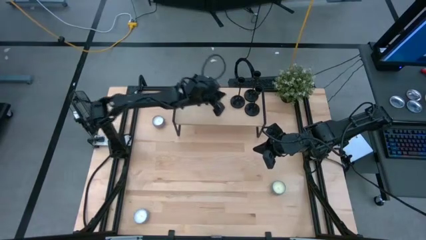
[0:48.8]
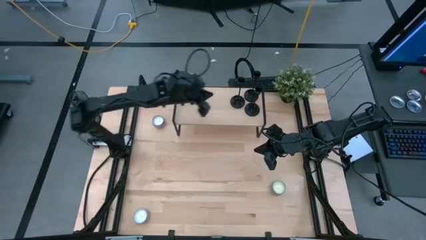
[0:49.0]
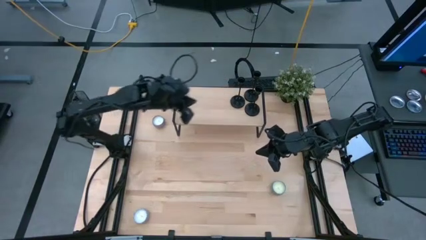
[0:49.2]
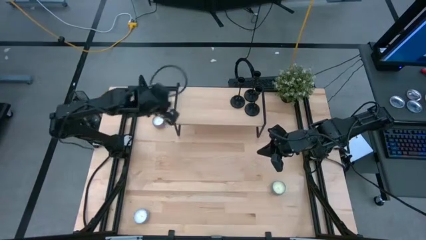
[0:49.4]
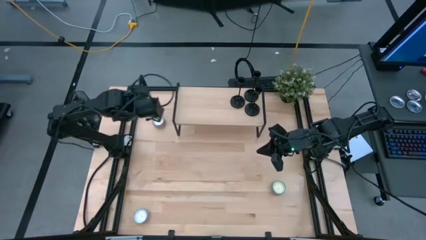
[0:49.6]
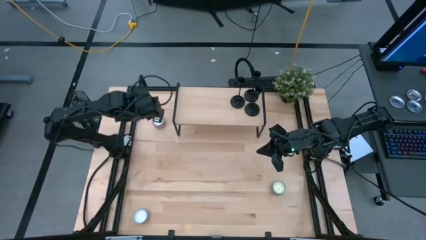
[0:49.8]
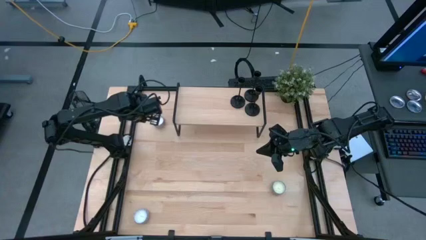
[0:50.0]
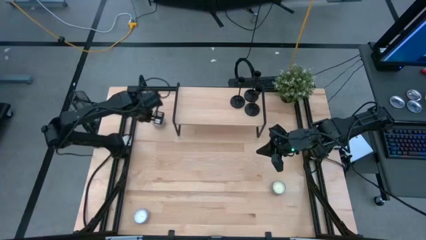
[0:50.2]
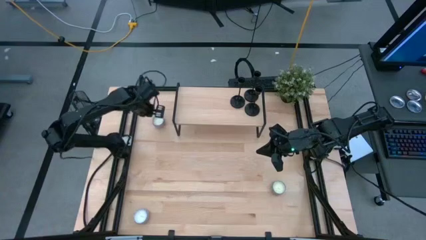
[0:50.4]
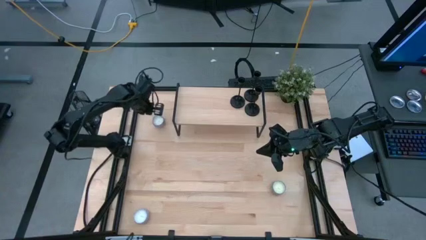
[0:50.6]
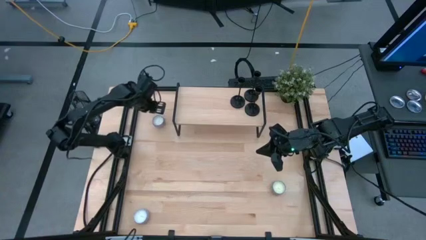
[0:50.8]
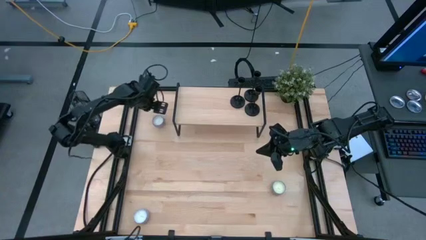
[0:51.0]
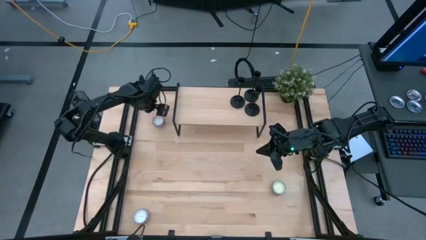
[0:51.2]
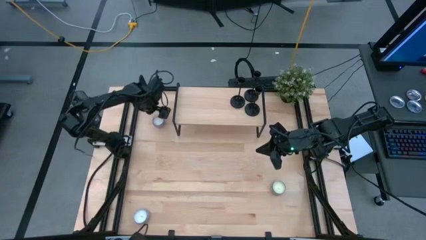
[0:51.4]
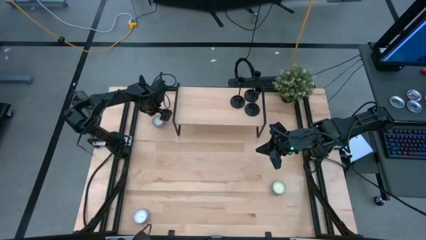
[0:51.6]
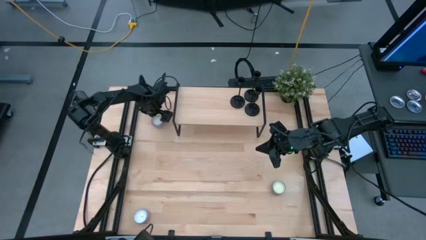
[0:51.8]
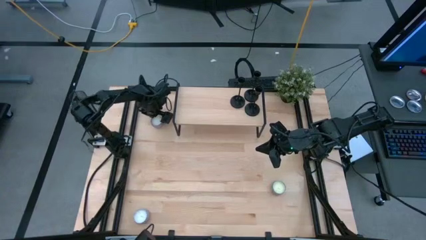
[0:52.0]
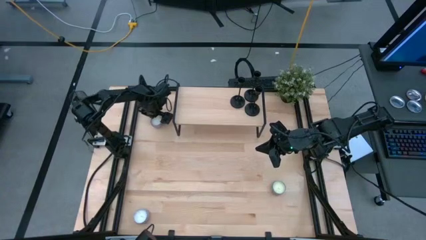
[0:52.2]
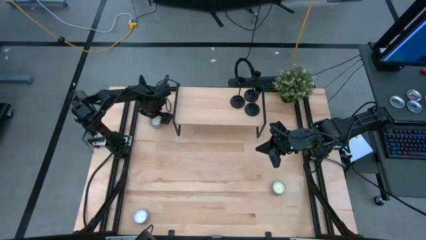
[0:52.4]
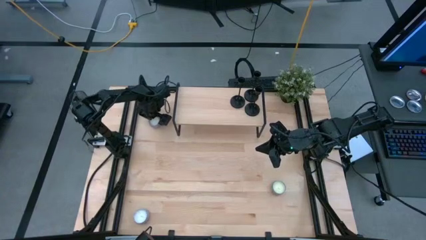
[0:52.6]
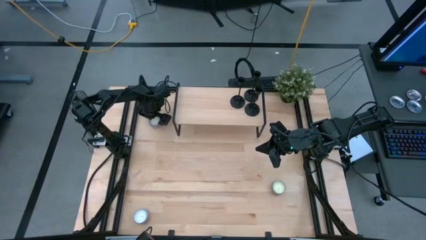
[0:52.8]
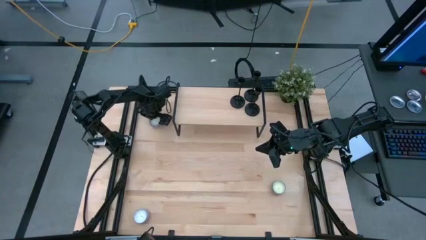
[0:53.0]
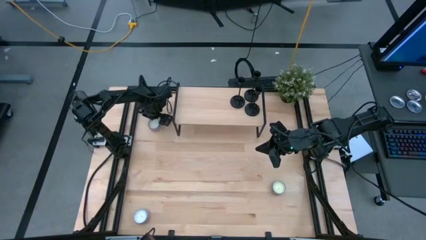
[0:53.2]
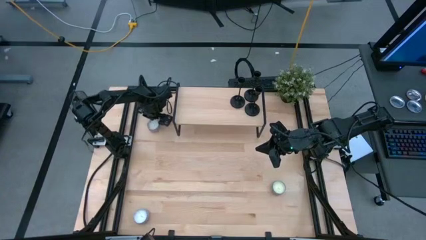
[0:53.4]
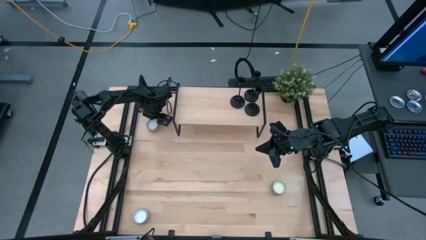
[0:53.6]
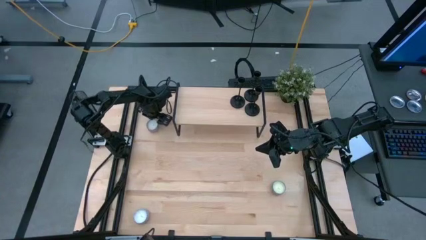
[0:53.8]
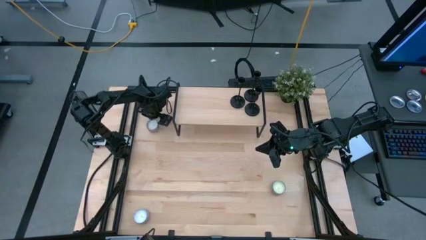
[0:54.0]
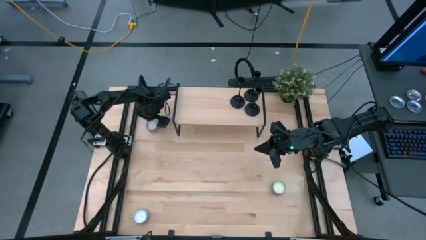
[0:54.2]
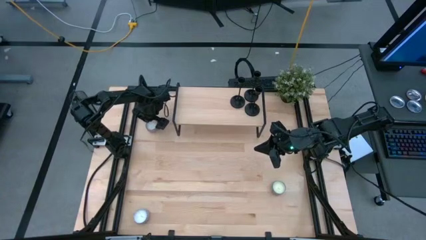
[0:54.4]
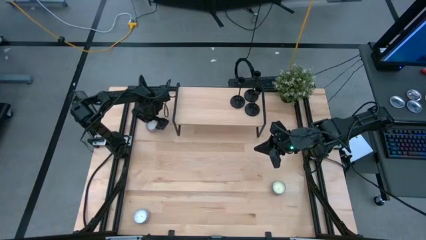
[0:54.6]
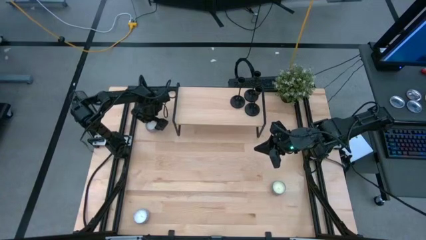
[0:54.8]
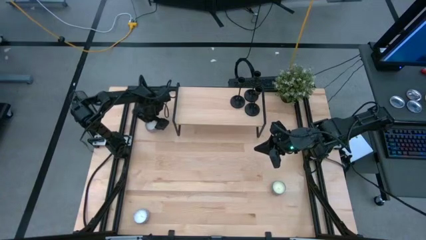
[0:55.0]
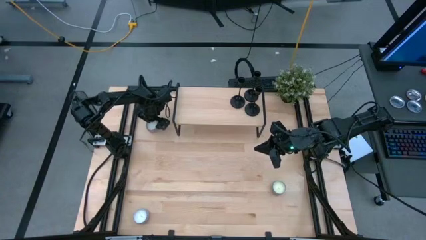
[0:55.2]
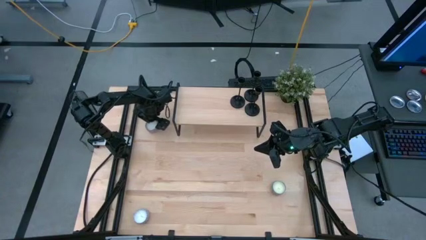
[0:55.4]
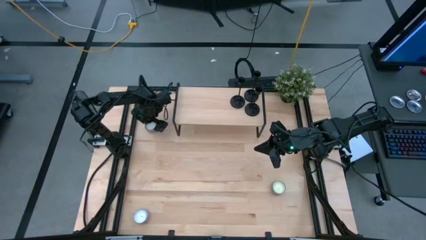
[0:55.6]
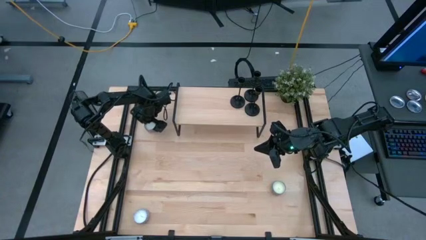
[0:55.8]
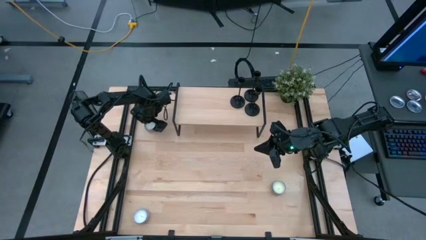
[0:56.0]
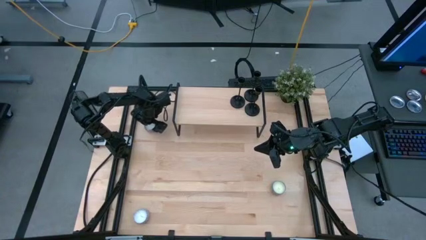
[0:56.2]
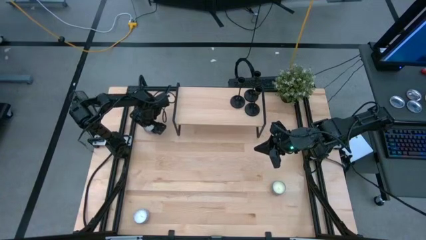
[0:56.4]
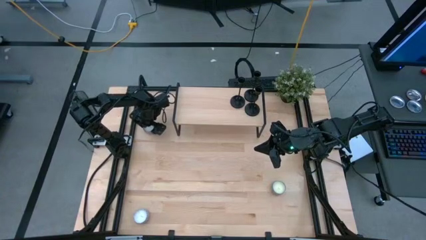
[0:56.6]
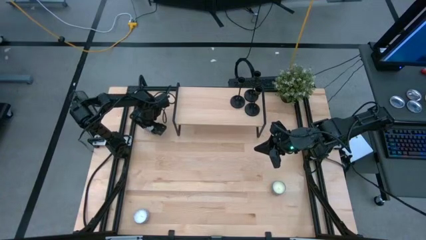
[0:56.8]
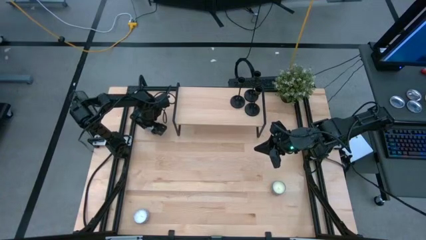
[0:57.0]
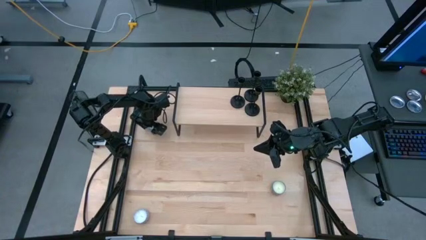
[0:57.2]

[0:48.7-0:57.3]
Task: Pick & Place candle stick holders
Put the pink and violet patterned scented candle on the shelf

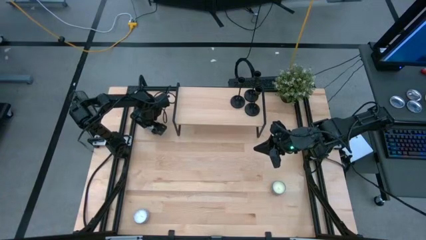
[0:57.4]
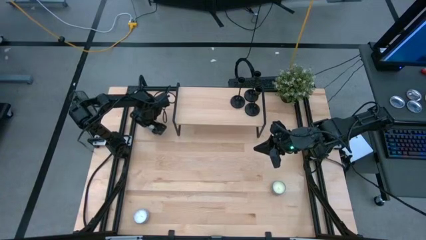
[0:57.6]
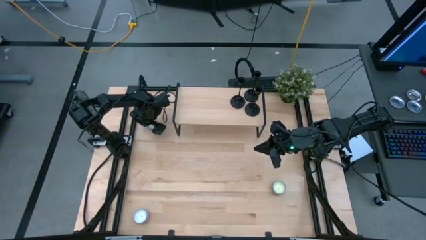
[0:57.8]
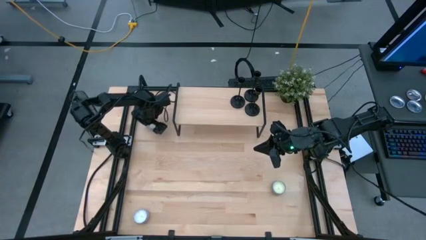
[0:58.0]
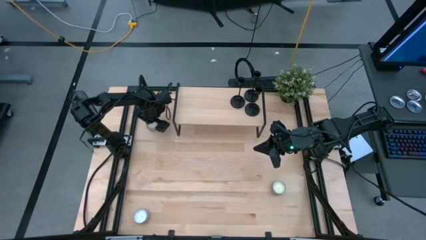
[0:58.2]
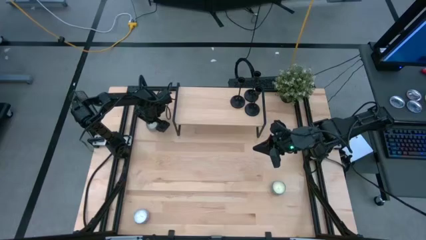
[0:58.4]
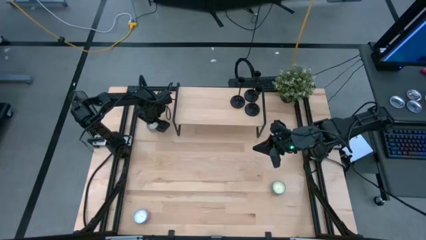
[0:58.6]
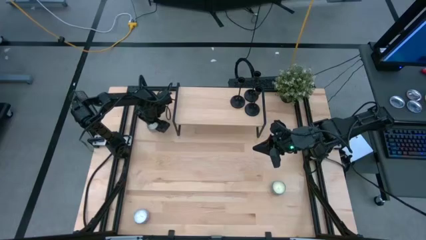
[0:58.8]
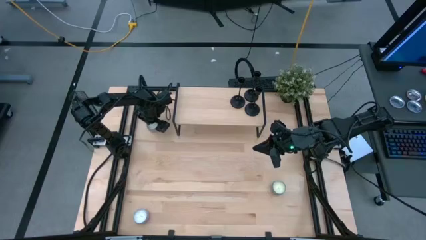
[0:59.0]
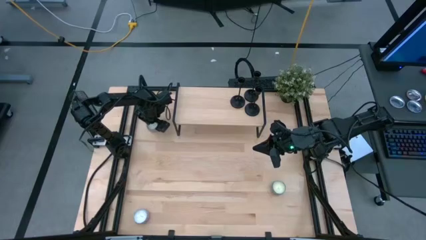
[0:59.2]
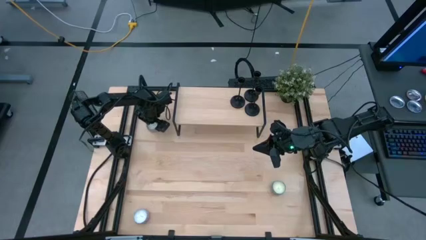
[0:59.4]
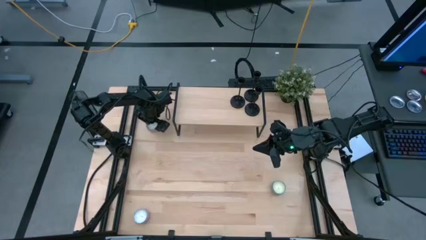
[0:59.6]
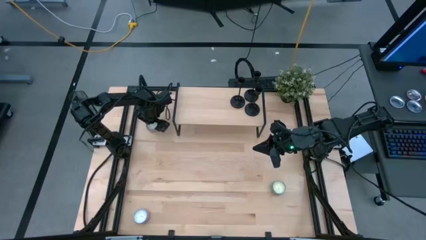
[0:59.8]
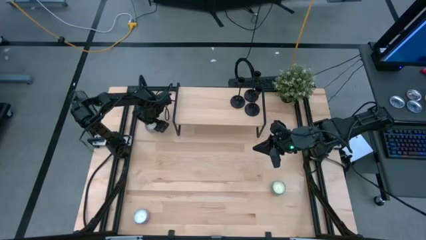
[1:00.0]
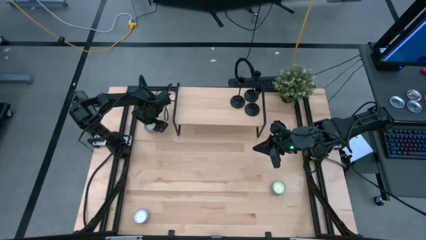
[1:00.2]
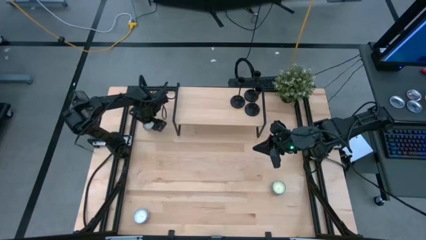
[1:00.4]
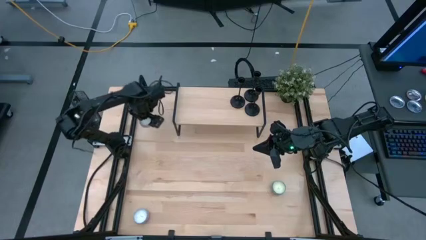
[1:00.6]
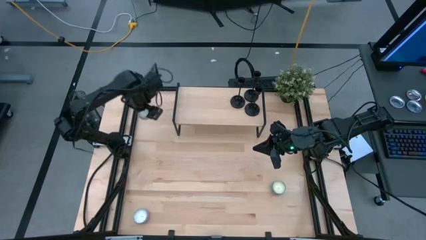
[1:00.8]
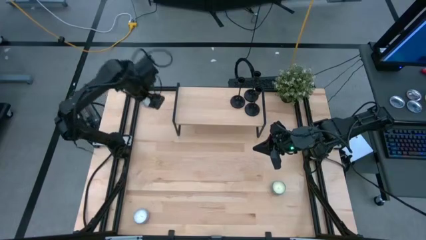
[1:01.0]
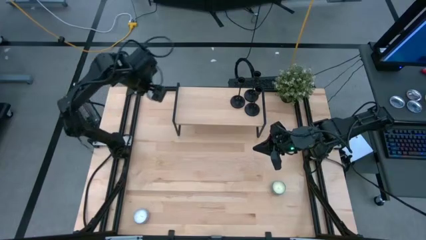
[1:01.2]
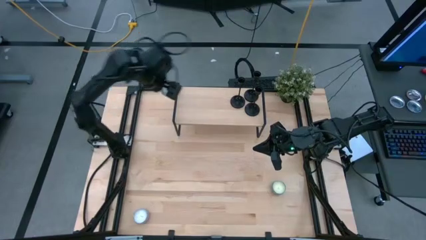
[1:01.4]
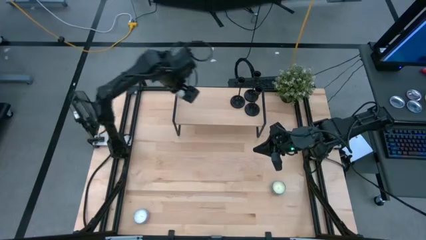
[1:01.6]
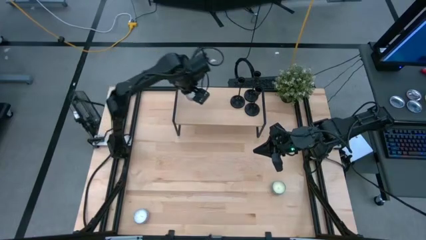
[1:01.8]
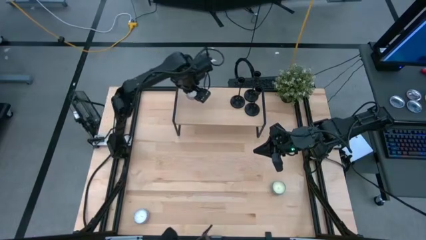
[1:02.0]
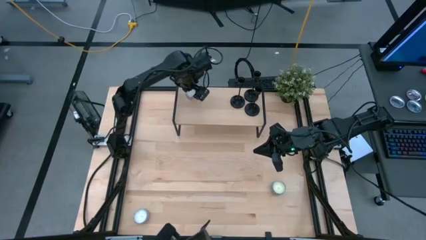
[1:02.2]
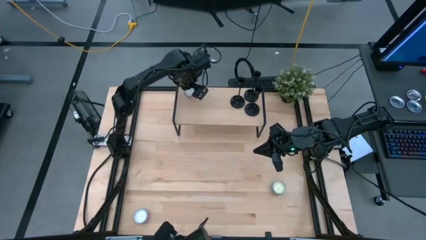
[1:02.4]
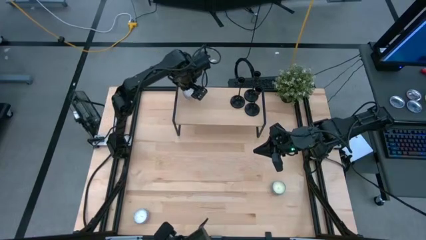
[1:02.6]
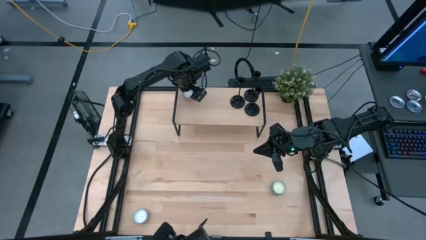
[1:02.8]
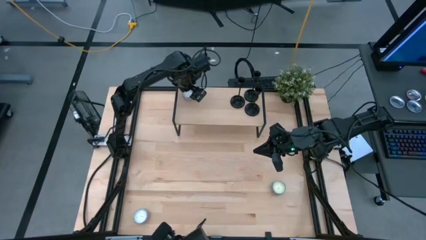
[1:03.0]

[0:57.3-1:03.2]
Put the pink and violet patterned scented candle on the shelf

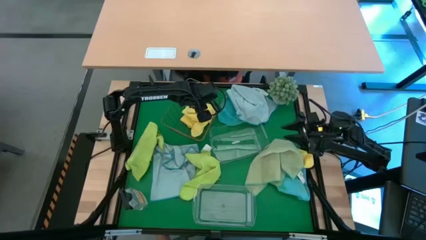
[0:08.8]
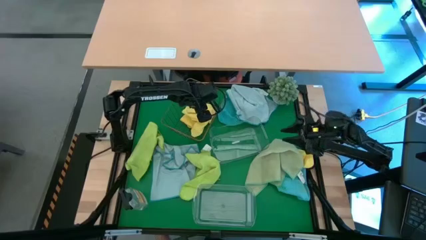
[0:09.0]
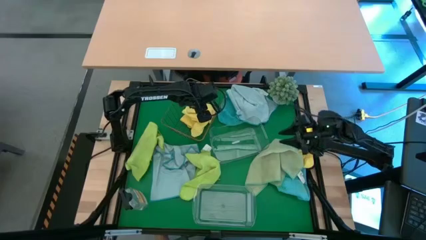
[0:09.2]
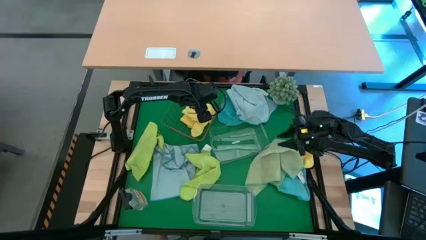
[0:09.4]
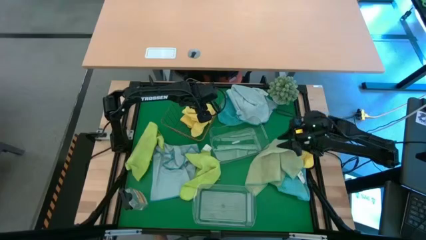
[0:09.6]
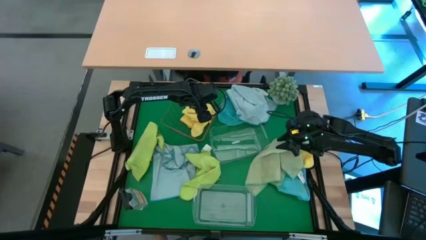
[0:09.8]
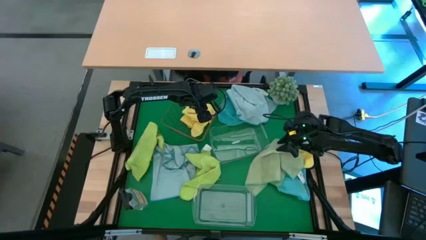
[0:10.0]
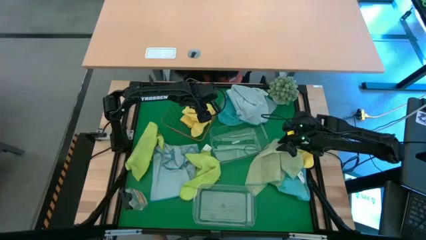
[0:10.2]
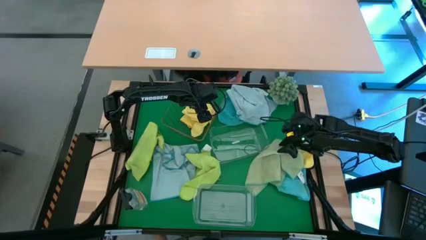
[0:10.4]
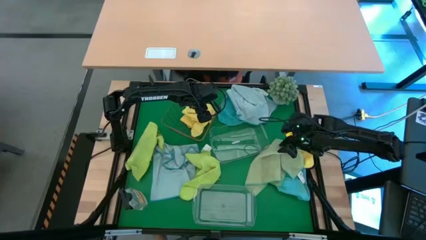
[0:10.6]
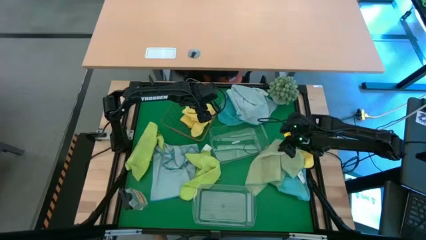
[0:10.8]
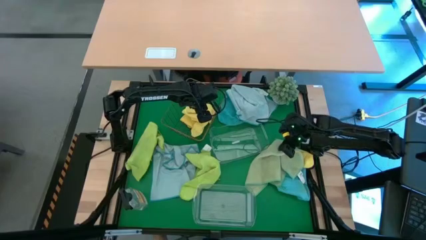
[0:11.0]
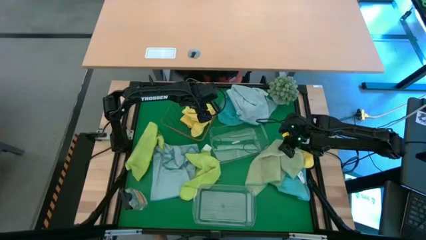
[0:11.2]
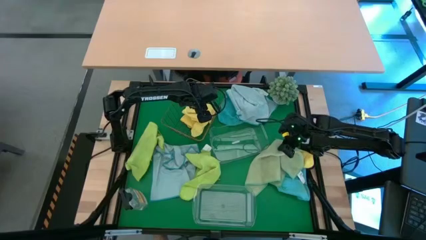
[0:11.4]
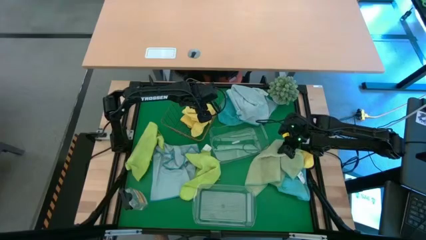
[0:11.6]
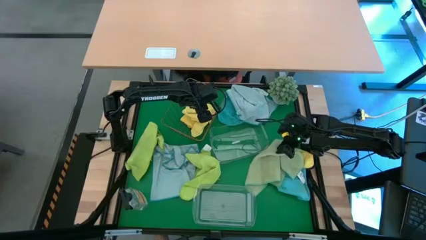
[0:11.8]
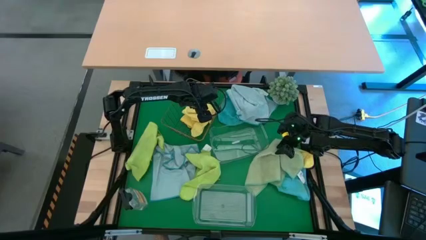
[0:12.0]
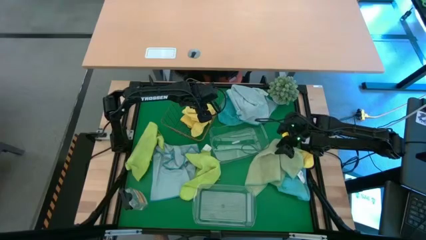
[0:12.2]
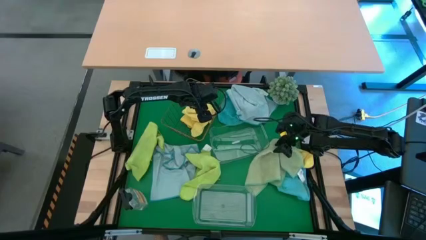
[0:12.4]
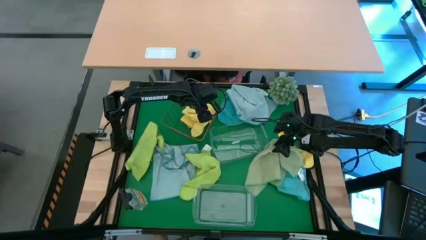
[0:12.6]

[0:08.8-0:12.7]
Task: Sort microfiber towel by color & place in baskets
Put the green towel into the bottom transparent bin
